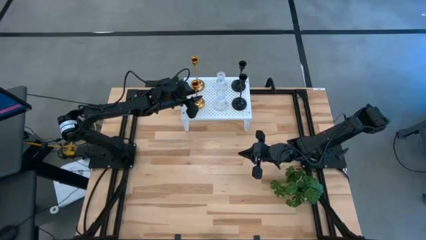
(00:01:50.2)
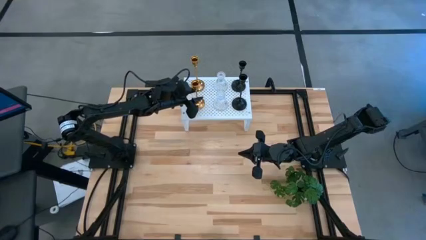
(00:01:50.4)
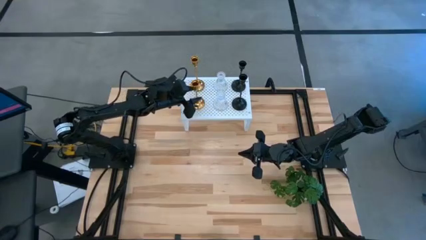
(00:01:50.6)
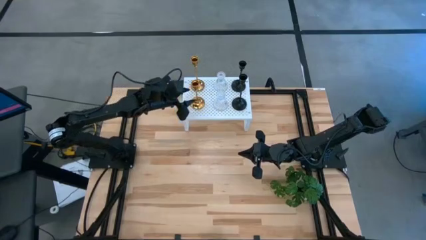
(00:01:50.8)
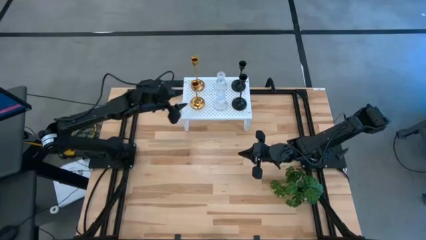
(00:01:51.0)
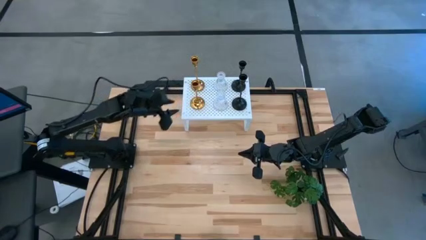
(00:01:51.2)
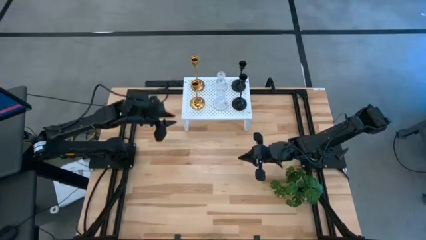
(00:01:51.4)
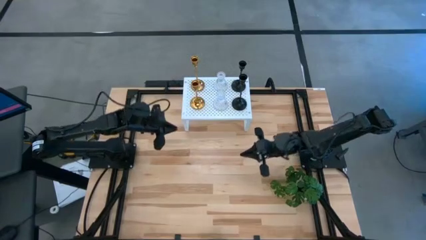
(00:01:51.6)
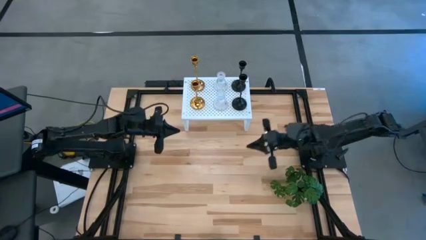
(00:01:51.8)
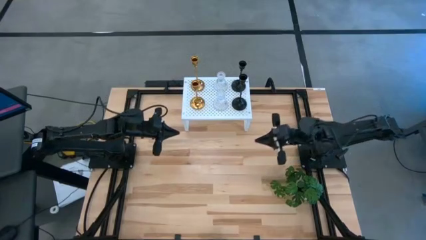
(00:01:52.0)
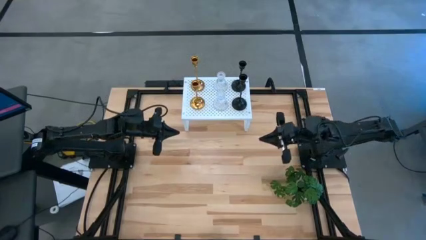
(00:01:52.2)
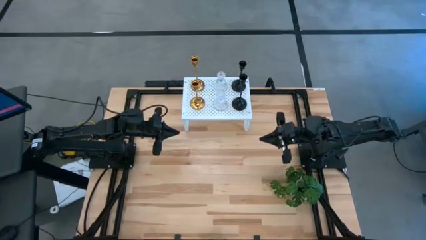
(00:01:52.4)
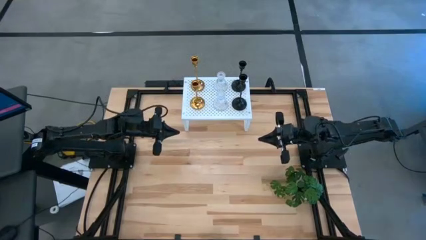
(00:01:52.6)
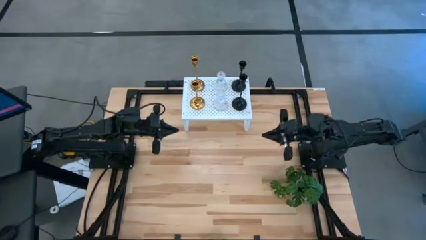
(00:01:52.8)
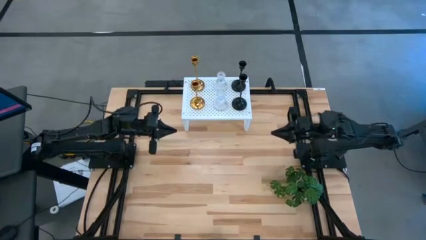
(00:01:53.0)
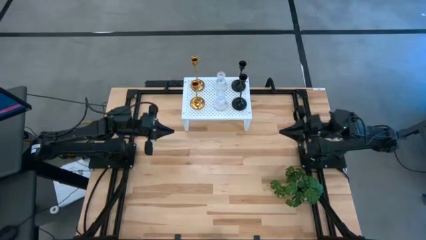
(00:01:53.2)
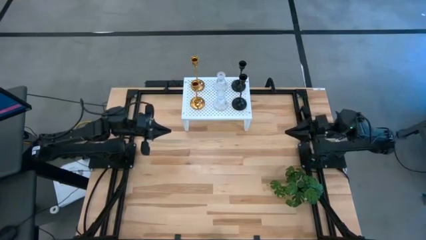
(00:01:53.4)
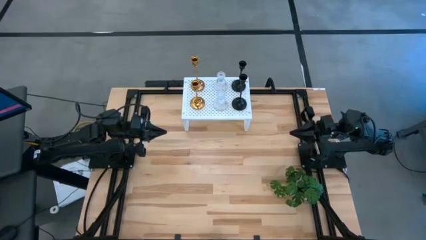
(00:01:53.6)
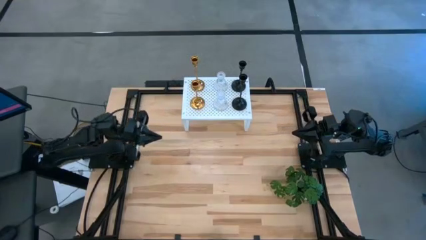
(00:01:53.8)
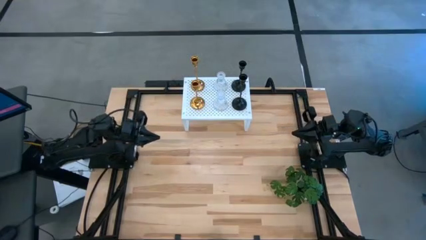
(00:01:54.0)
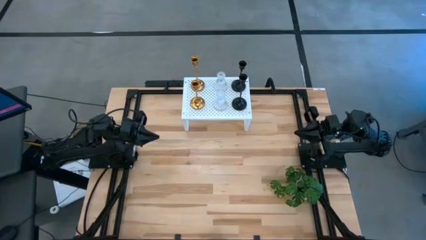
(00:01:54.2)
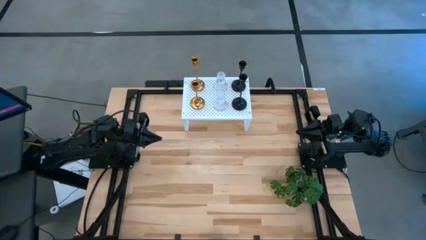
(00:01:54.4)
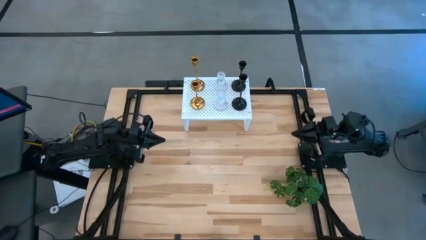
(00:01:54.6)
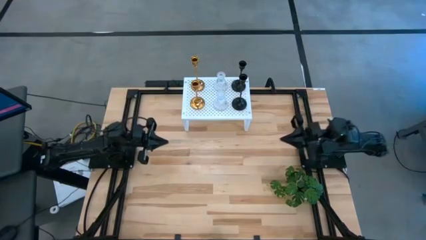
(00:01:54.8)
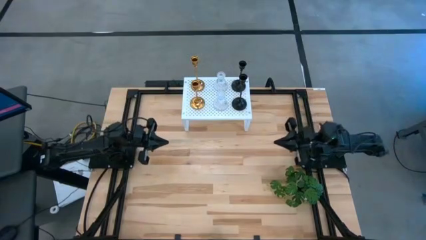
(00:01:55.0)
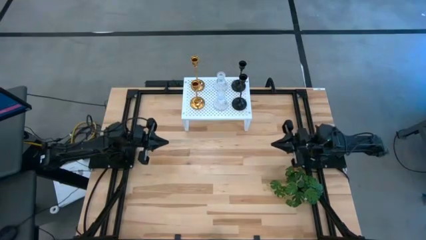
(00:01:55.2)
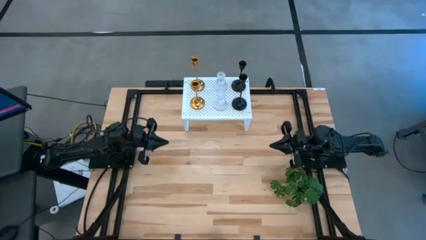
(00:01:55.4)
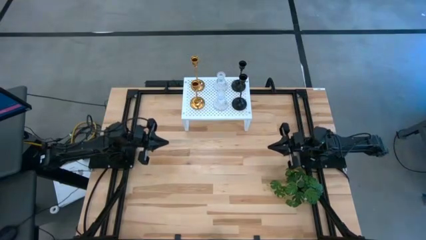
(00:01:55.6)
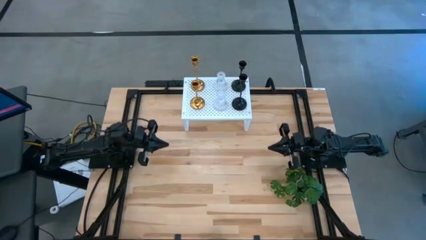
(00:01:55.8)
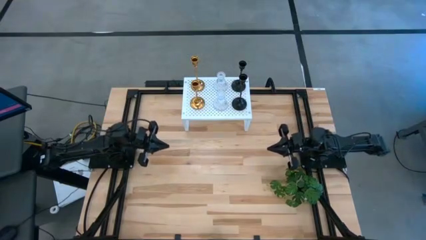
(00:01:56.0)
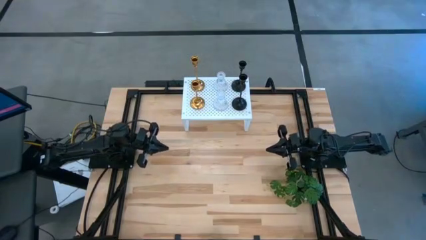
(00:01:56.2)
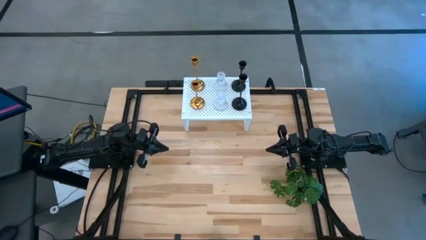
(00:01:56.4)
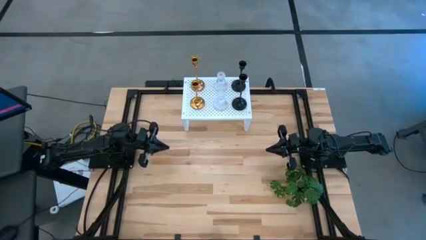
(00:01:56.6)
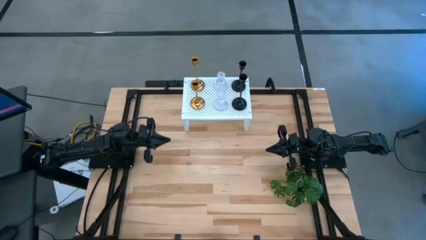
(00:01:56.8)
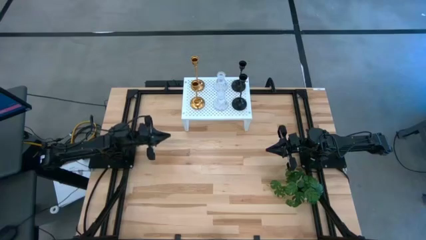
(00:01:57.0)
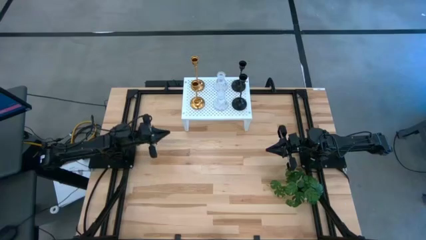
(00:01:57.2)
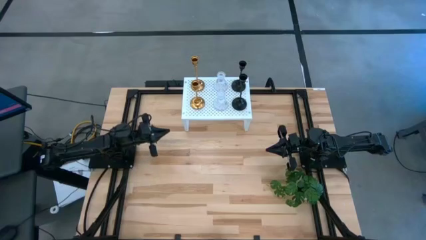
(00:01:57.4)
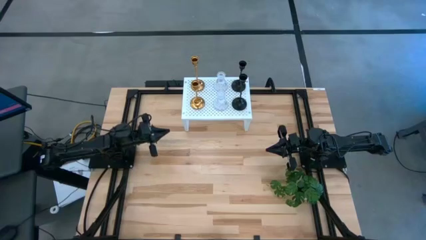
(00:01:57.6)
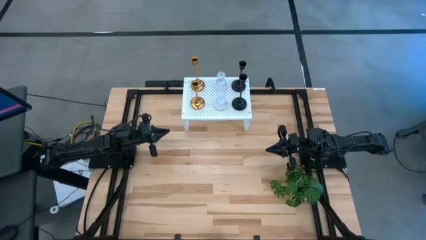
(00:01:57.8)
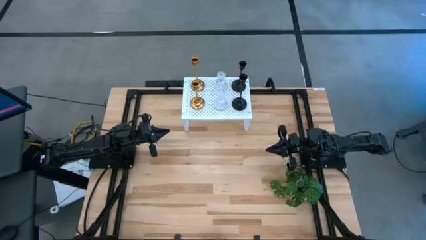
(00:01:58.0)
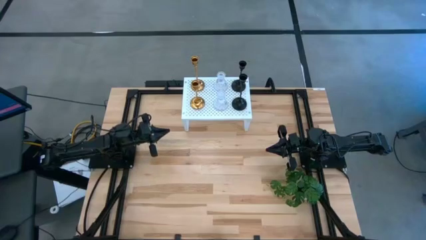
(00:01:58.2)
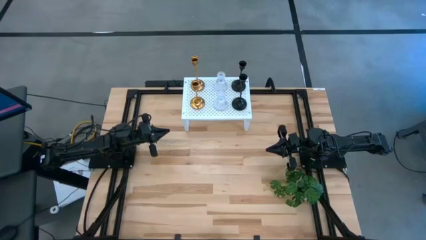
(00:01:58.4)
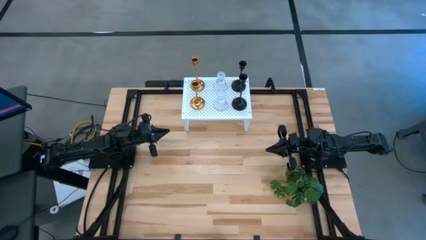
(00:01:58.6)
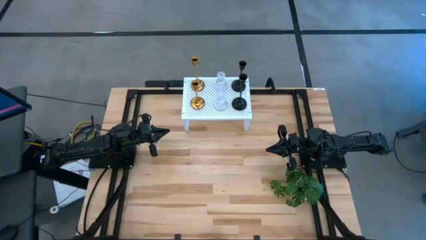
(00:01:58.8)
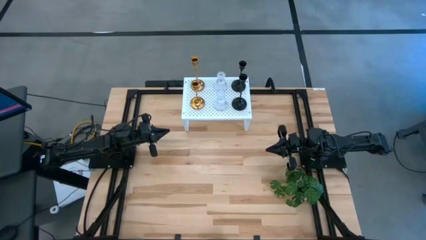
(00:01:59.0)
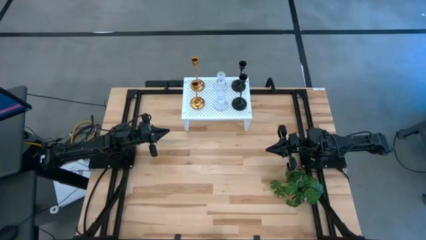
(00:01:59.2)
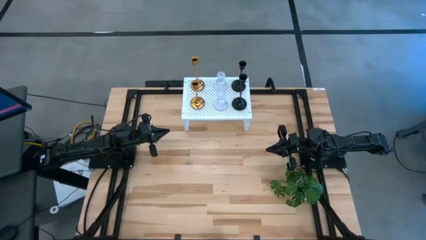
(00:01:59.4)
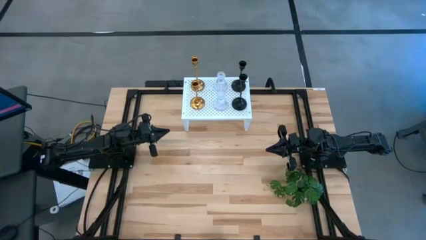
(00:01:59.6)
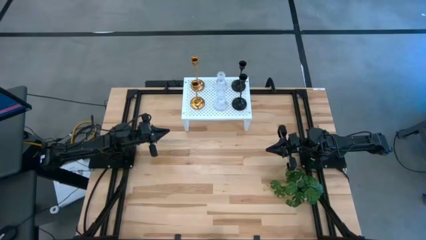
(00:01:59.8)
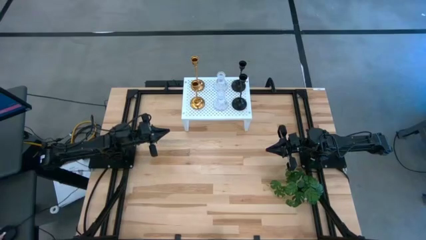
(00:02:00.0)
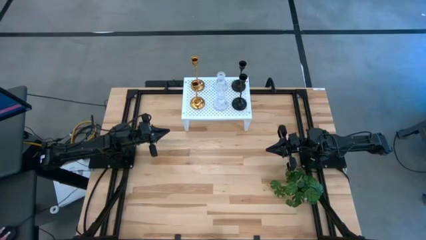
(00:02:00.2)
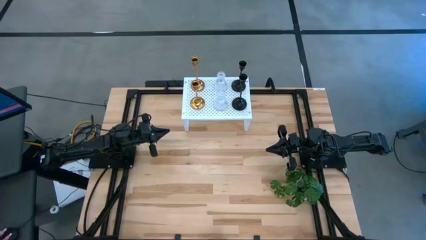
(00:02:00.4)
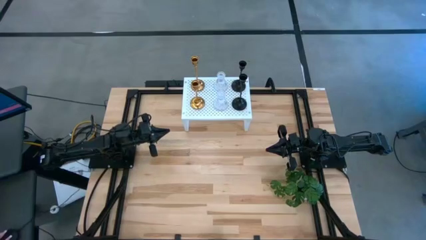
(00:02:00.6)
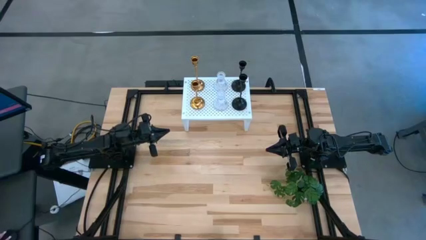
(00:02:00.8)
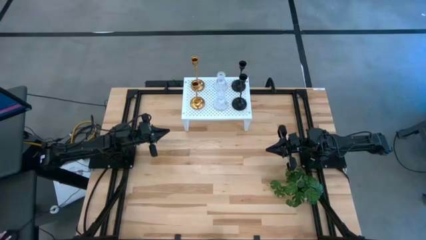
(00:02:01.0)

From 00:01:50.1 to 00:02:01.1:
Task: Pick & Place candle stick holders
Return to Home Position
